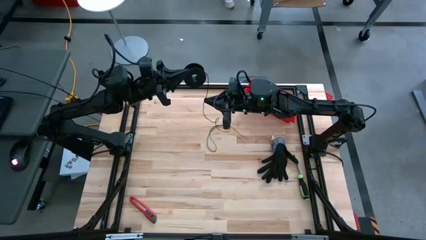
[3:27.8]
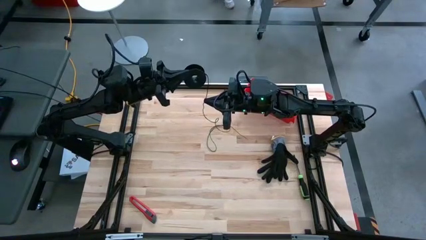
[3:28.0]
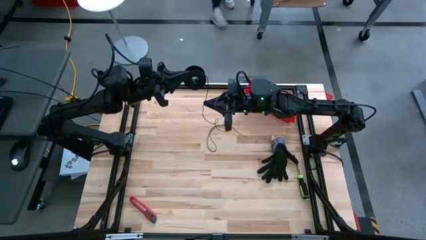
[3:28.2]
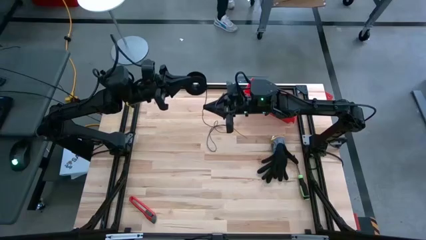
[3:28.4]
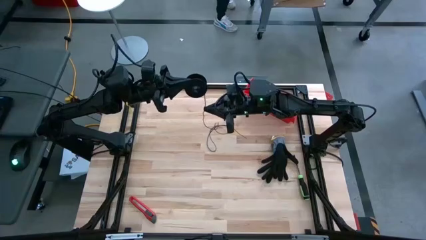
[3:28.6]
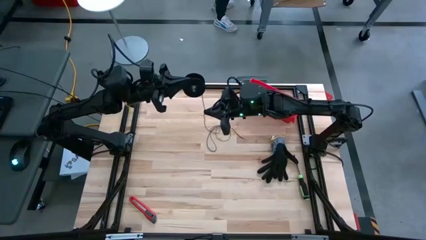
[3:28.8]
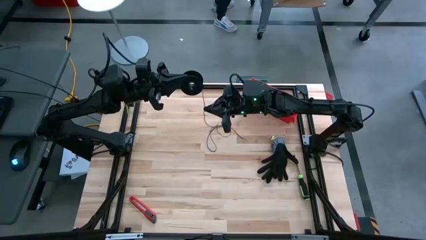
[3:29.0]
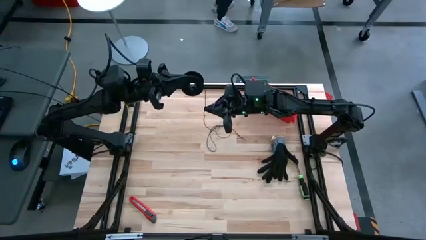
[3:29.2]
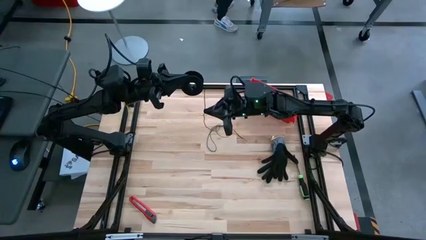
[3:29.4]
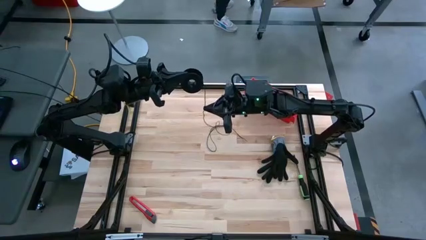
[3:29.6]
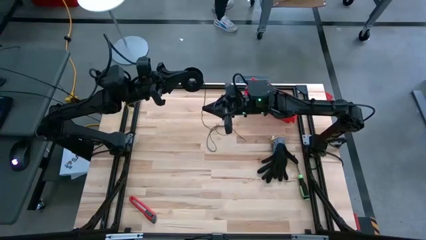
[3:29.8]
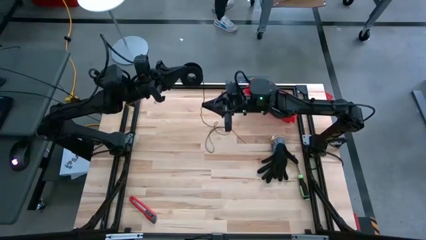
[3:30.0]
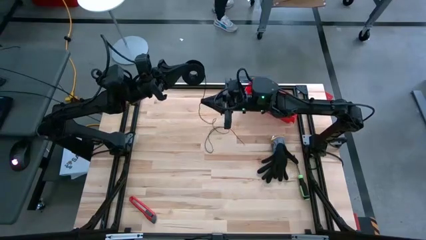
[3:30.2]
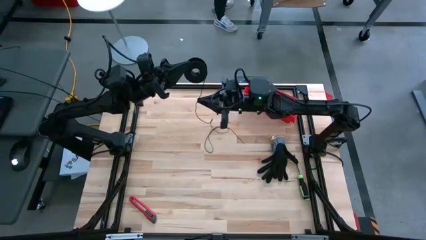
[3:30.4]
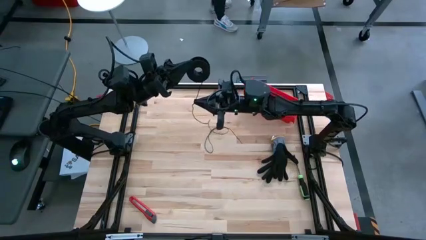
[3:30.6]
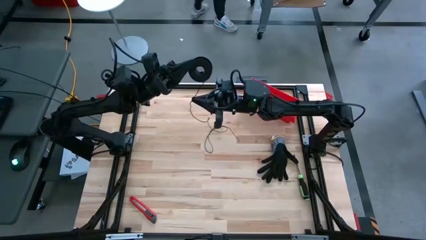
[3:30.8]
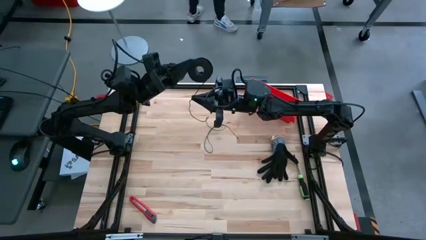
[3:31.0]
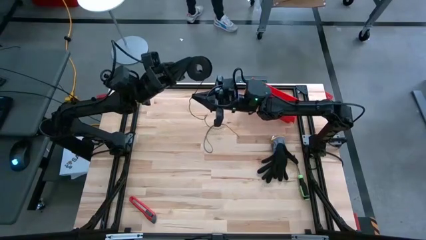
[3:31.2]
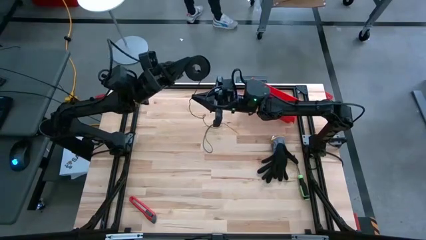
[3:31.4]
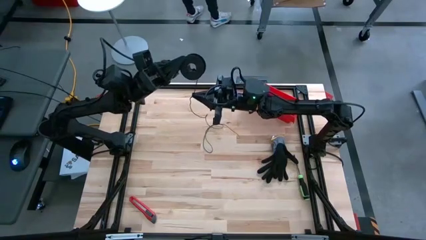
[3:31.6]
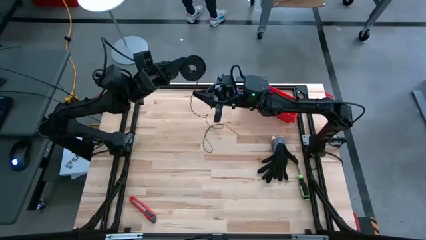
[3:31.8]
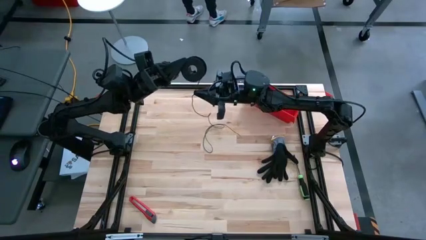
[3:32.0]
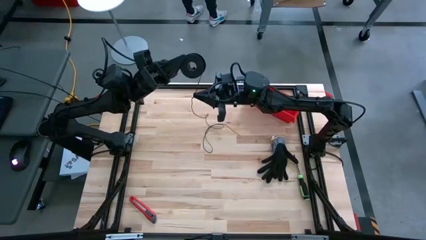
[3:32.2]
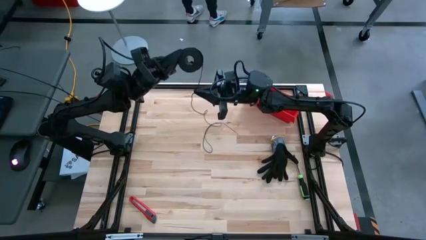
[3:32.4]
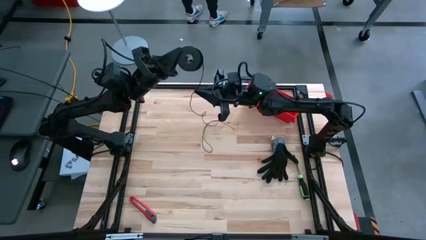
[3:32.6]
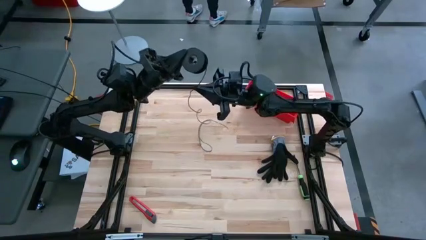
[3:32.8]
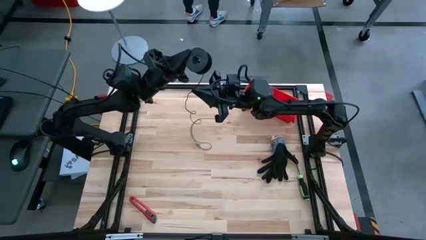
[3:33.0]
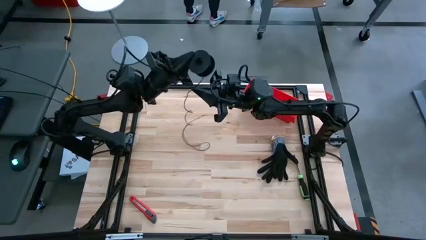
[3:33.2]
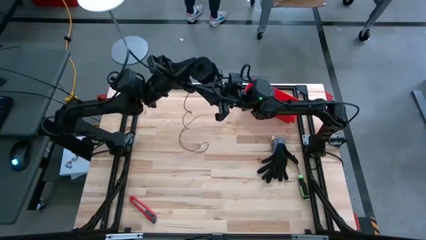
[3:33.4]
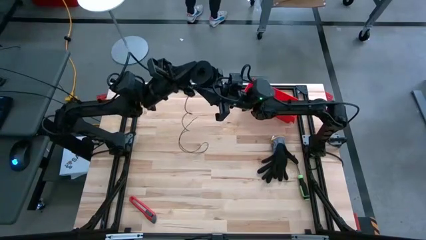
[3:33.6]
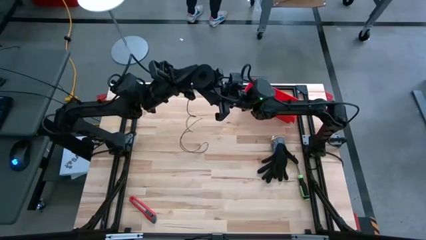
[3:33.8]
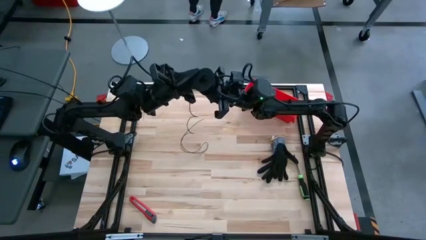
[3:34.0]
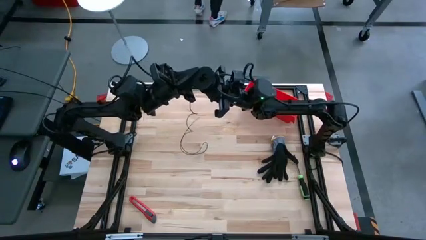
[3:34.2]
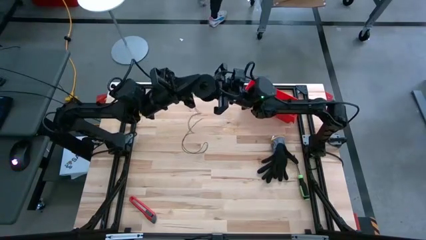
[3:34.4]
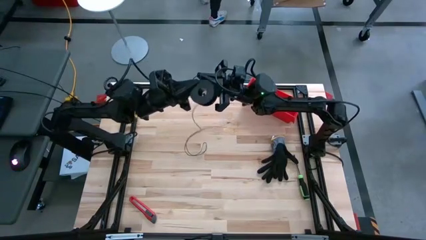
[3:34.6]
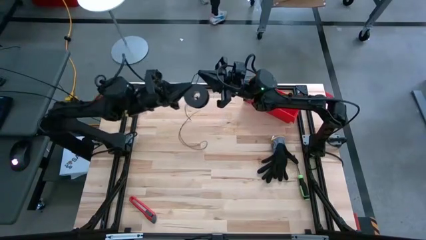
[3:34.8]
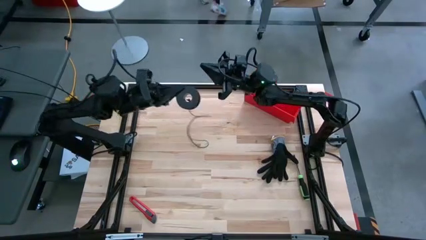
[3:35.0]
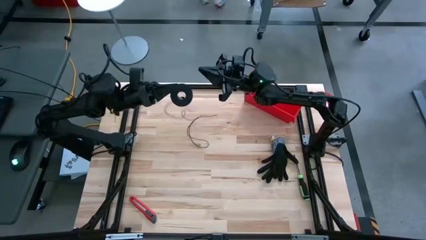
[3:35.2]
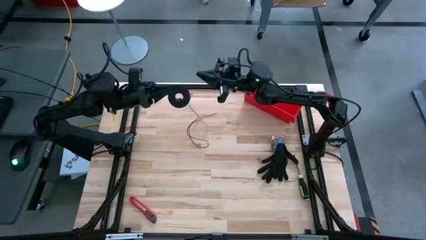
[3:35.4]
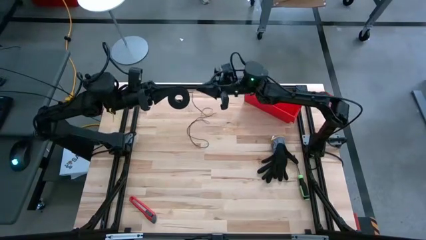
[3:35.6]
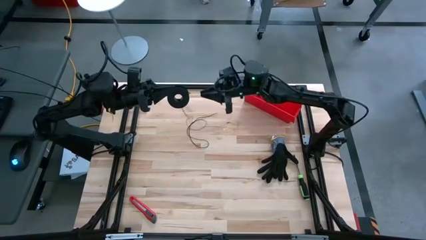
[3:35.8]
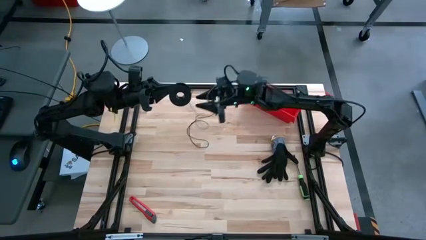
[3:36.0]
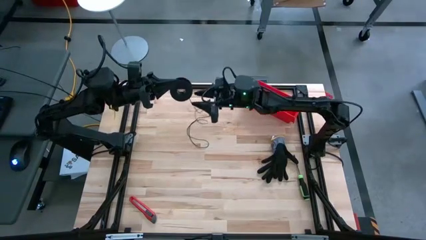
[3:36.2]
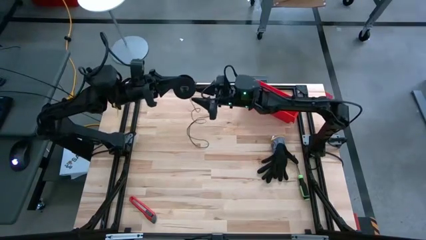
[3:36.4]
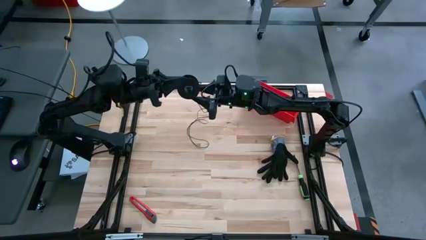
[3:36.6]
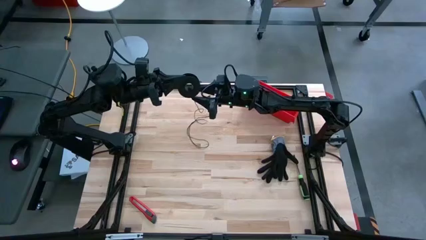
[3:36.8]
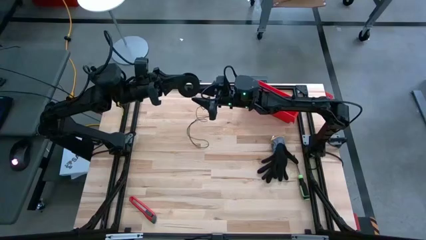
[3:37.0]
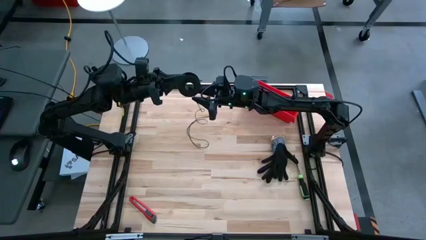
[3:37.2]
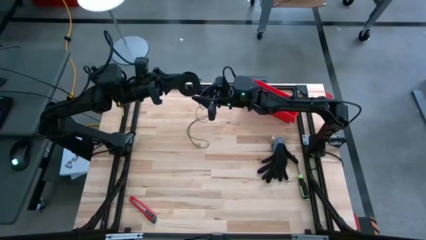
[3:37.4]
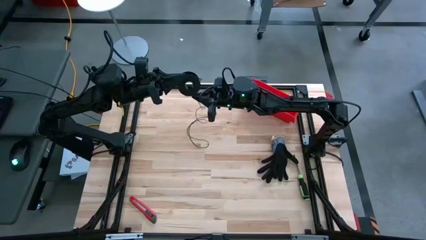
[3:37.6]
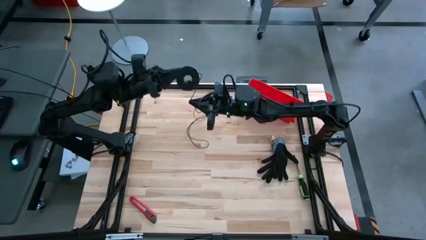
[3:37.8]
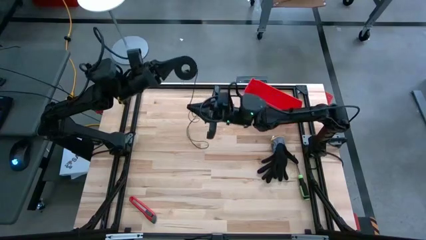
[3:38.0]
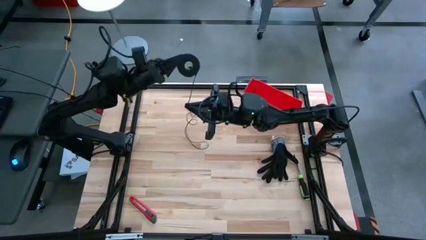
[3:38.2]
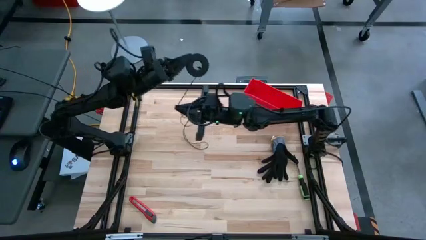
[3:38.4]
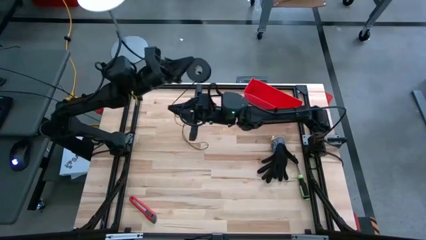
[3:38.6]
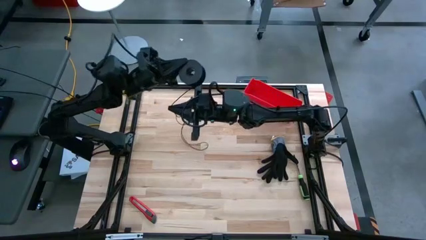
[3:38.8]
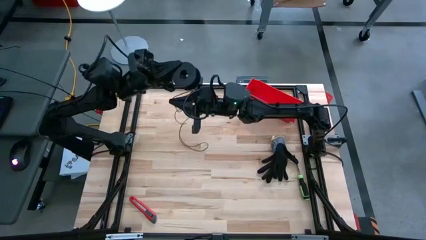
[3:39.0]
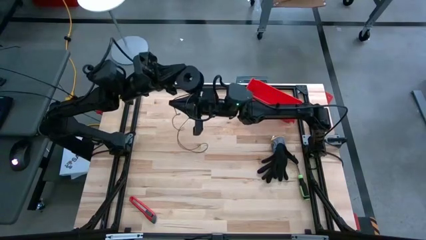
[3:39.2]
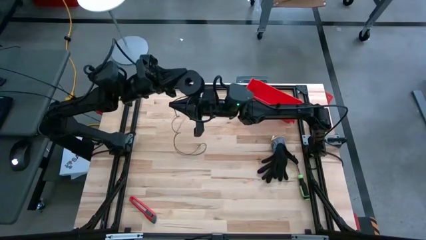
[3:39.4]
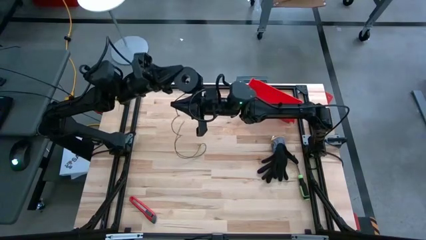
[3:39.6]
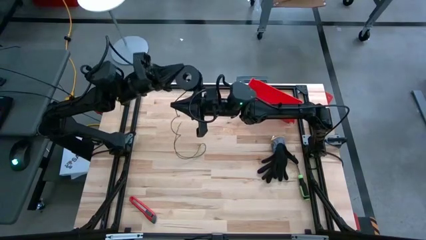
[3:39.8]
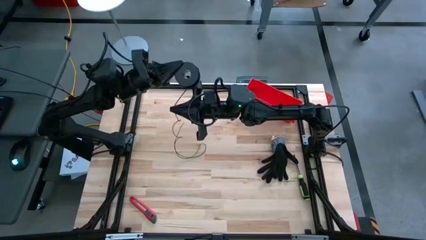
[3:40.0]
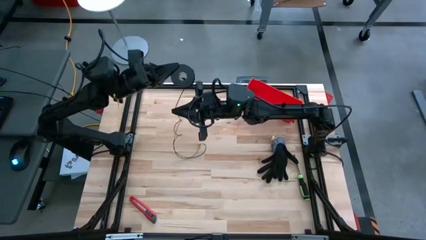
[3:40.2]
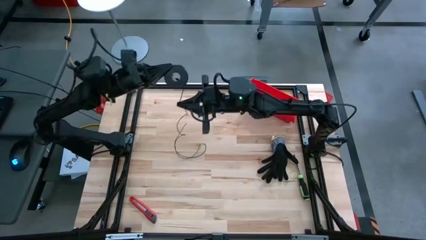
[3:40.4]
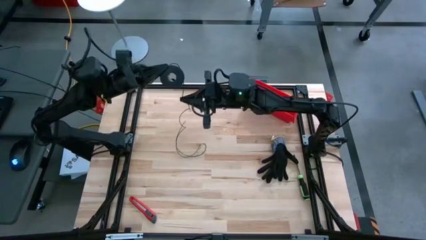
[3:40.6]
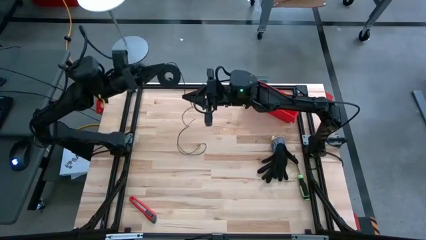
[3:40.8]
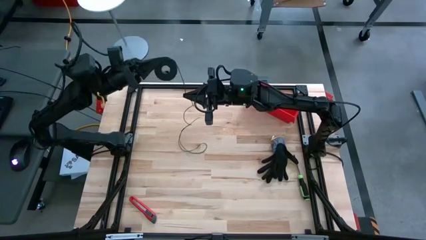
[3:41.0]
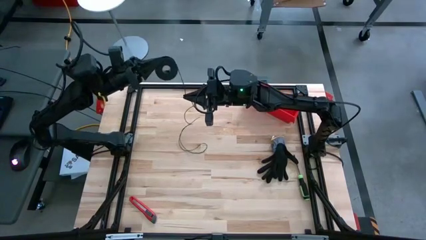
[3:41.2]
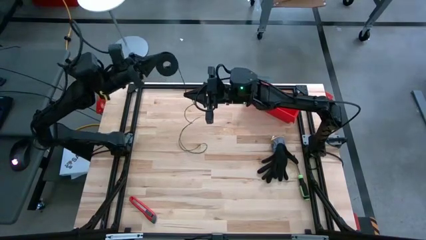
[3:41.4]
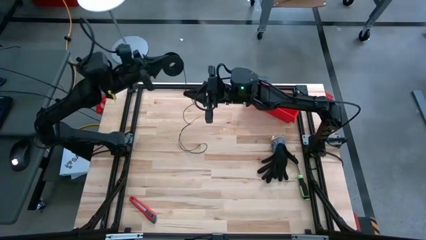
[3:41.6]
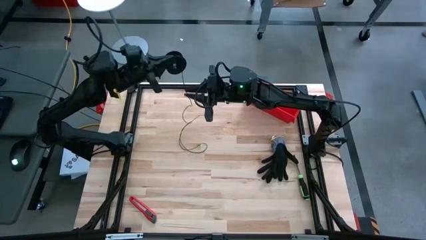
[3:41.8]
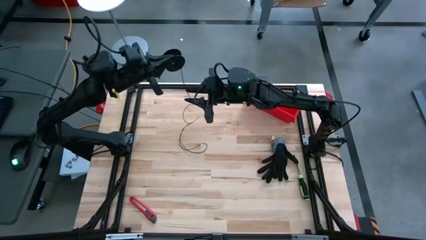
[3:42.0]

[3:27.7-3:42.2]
Task: Coil cords
Coil the black wire on the spool

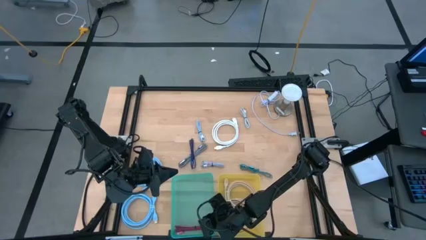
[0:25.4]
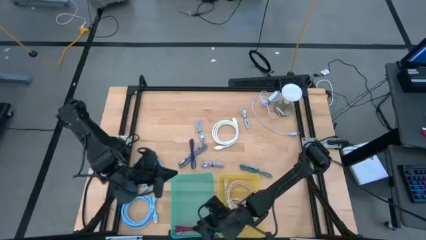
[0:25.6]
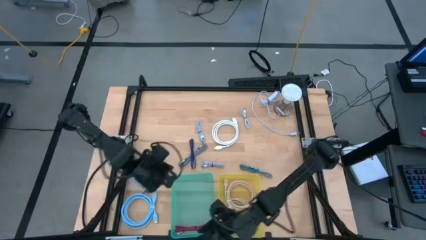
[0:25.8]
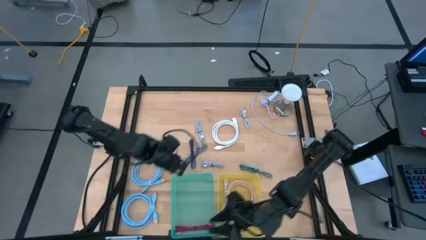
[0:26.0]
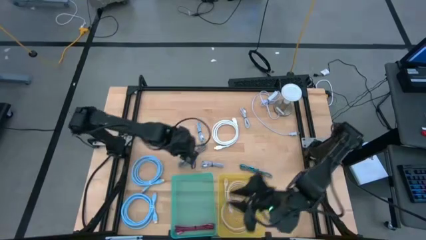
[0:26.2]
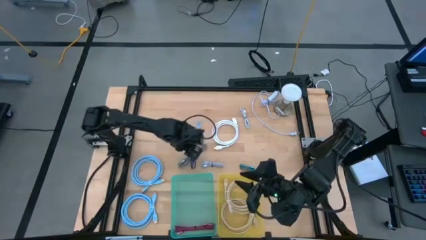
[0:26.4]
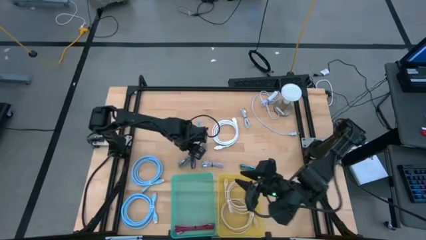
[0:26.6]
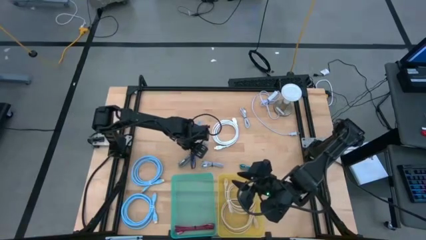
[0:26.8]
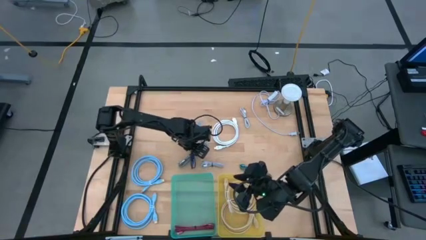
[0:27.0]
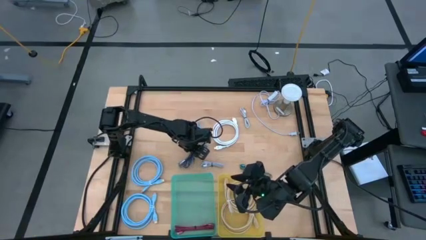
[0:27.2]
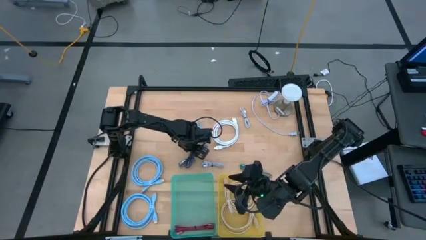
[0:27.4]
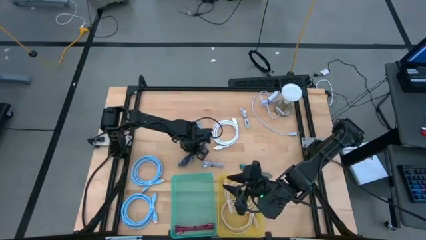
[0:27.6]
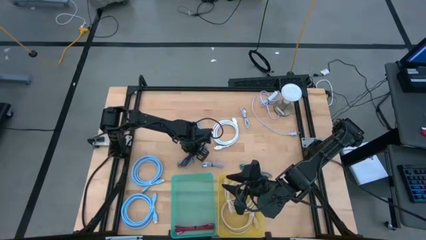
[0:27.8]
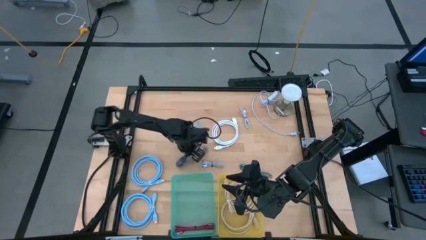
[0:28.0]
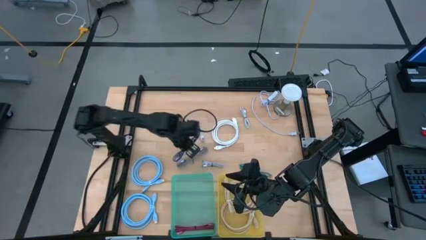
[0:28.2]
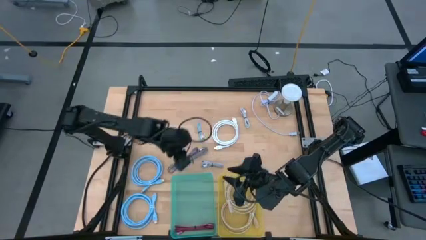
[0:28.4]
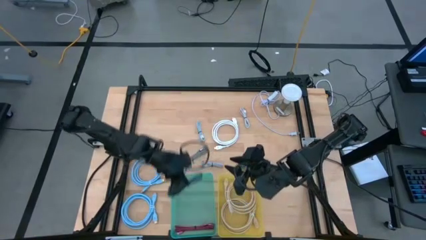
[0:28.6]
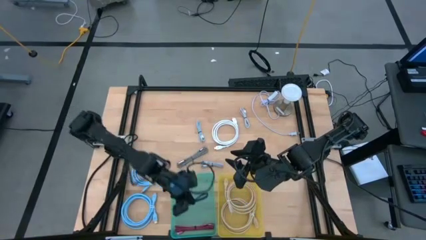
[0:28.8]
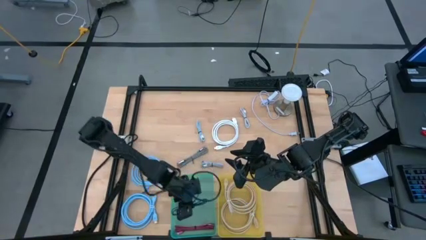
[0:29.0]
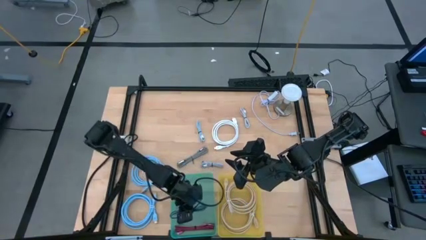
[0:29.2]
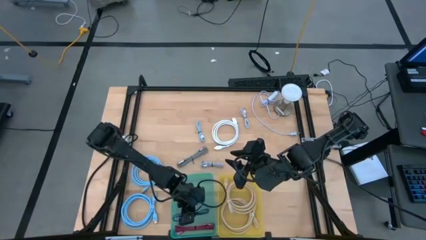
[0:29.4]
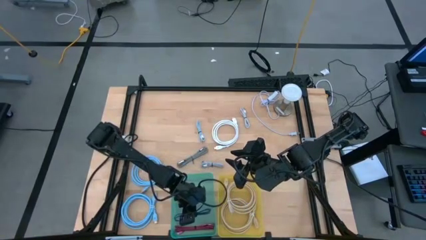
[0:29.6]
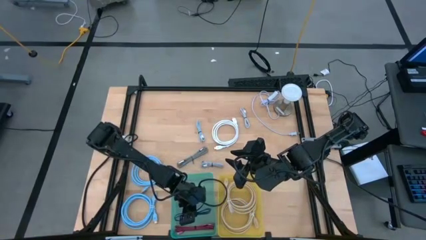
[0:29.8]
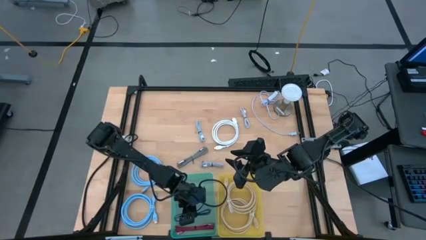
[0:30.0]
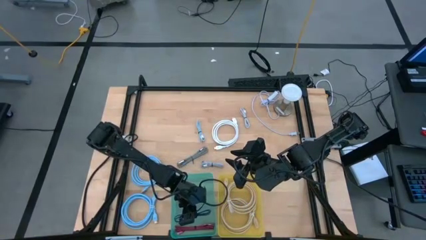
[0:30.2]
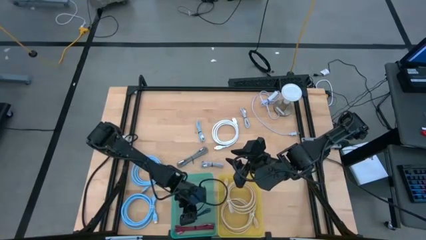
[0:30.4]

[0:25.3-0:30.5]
Task: Pick & Place USB Port
Put the violet USB cable into the green bin
